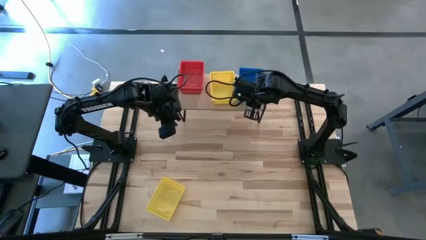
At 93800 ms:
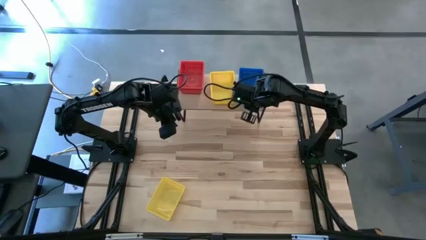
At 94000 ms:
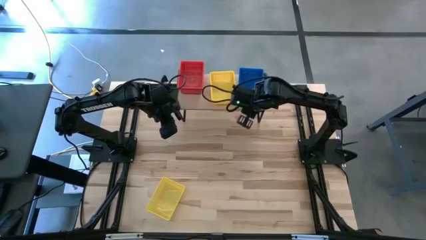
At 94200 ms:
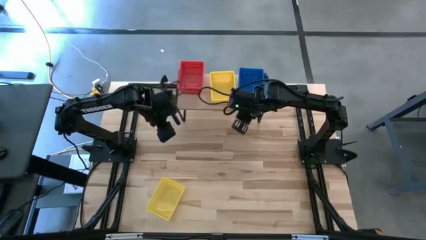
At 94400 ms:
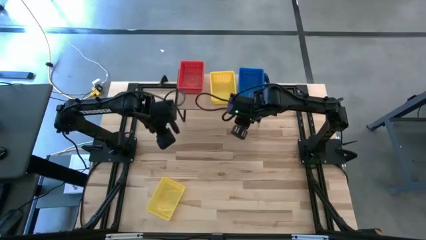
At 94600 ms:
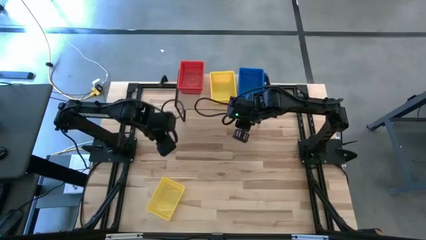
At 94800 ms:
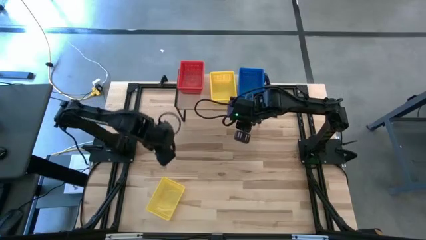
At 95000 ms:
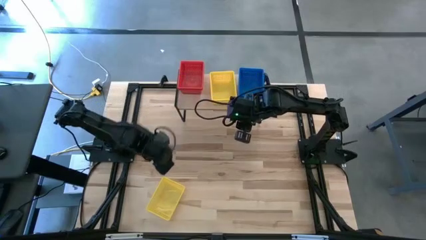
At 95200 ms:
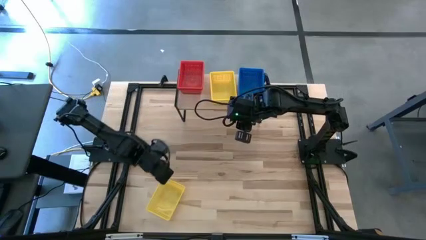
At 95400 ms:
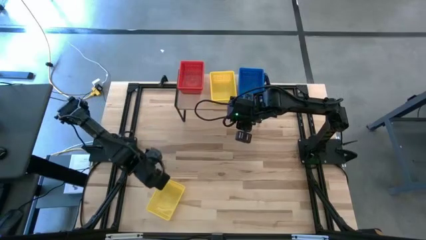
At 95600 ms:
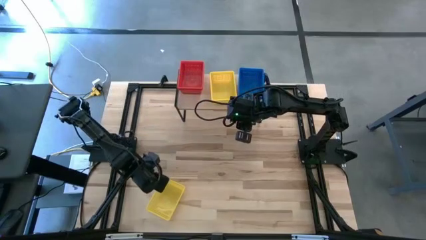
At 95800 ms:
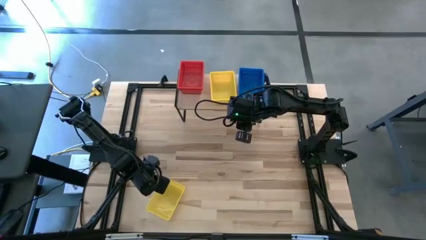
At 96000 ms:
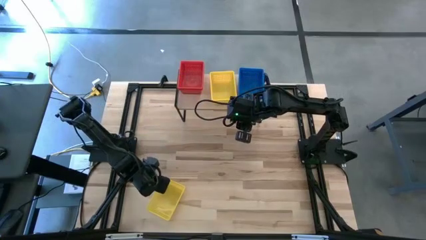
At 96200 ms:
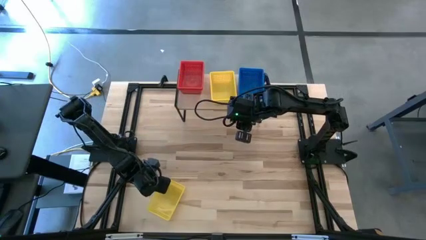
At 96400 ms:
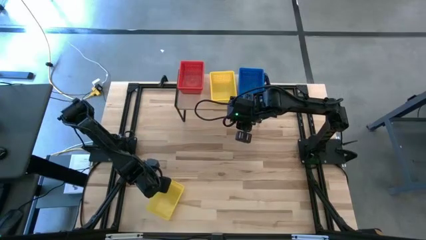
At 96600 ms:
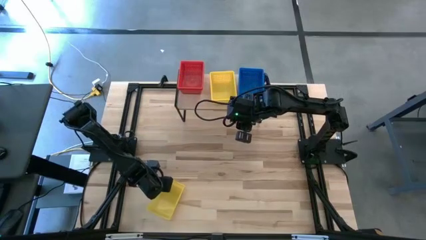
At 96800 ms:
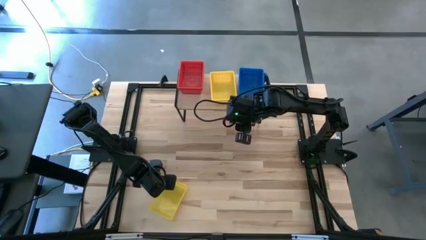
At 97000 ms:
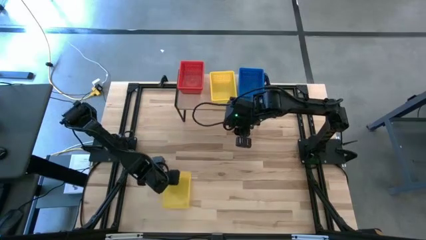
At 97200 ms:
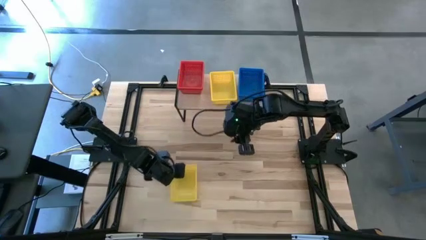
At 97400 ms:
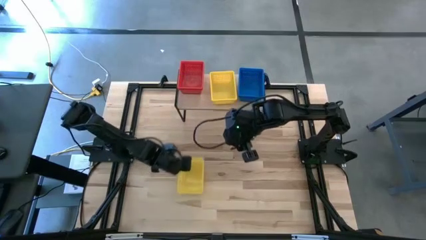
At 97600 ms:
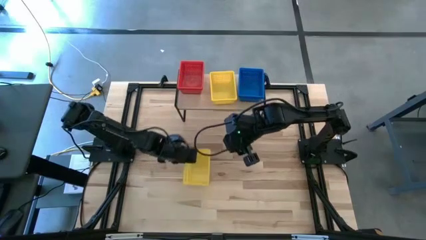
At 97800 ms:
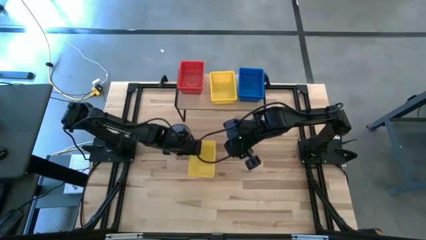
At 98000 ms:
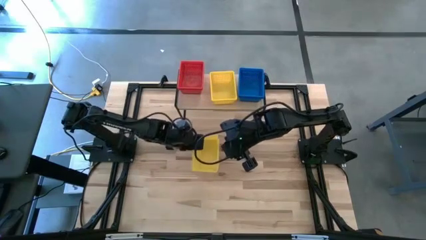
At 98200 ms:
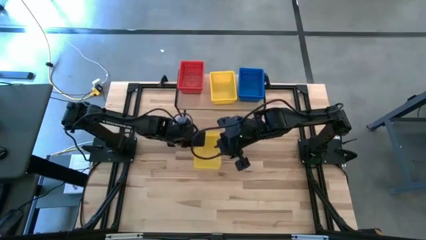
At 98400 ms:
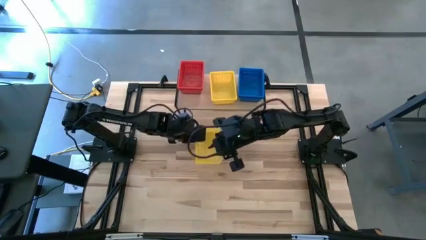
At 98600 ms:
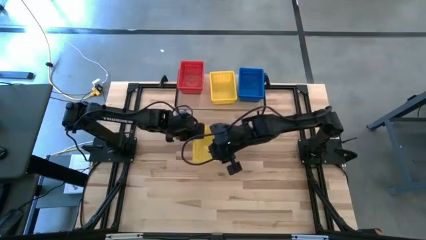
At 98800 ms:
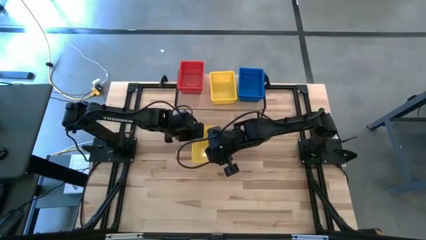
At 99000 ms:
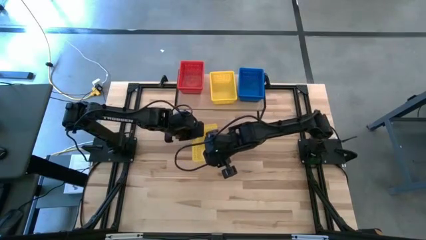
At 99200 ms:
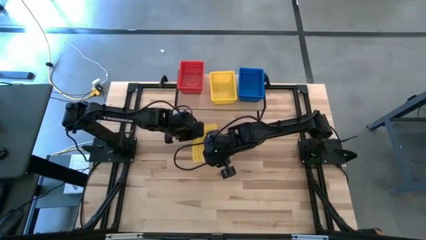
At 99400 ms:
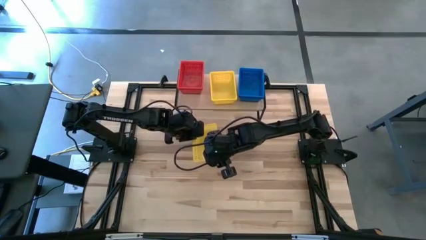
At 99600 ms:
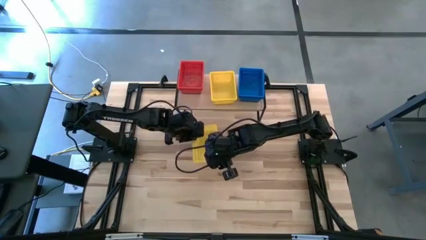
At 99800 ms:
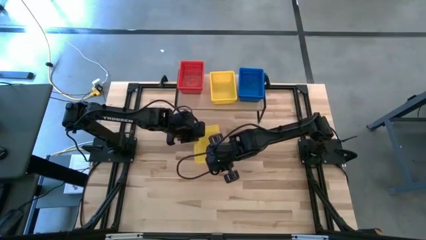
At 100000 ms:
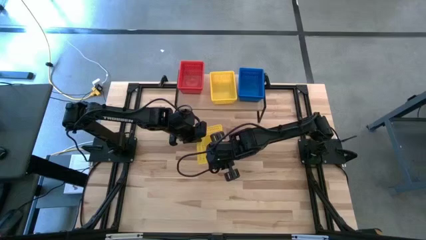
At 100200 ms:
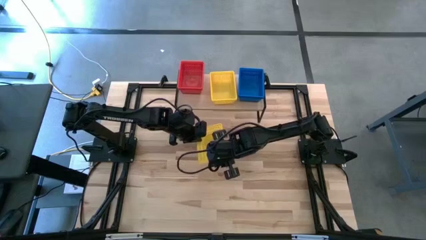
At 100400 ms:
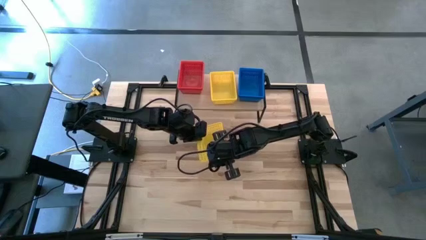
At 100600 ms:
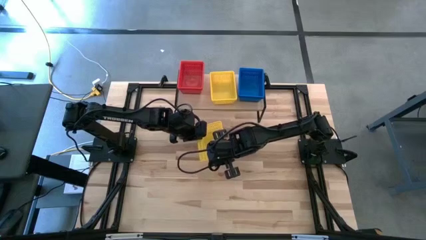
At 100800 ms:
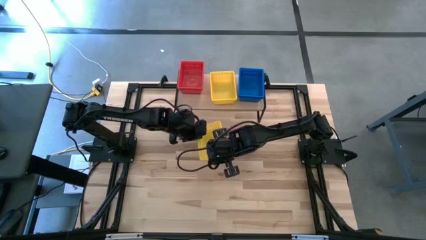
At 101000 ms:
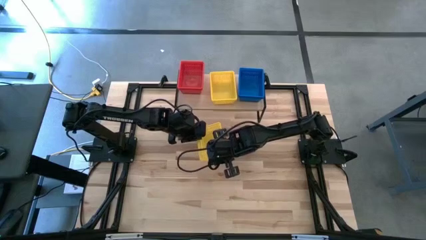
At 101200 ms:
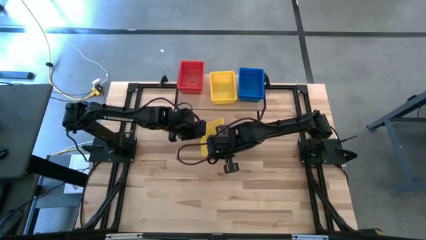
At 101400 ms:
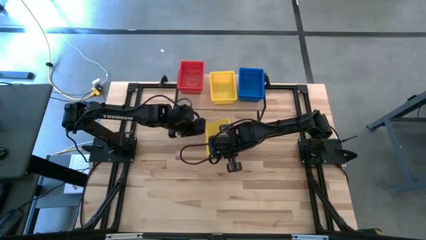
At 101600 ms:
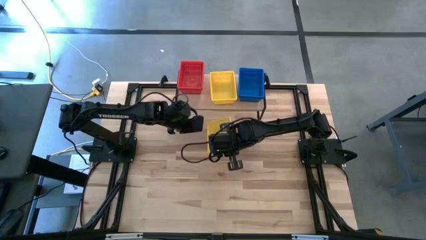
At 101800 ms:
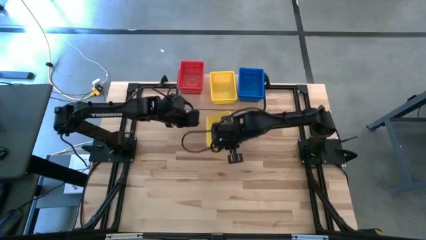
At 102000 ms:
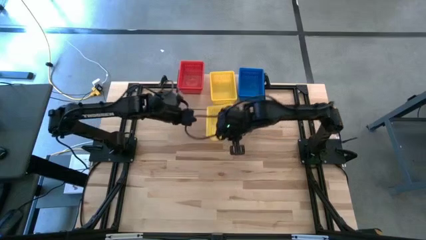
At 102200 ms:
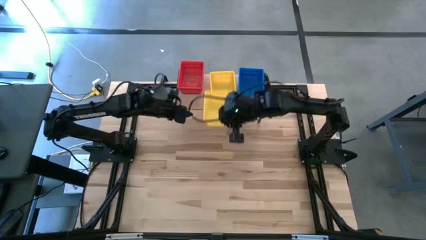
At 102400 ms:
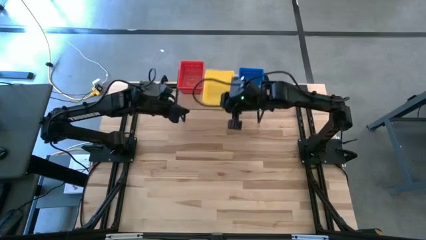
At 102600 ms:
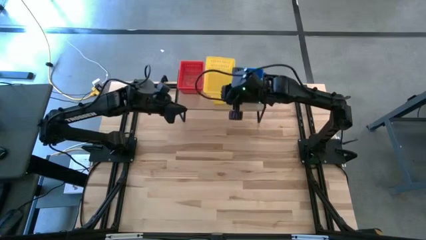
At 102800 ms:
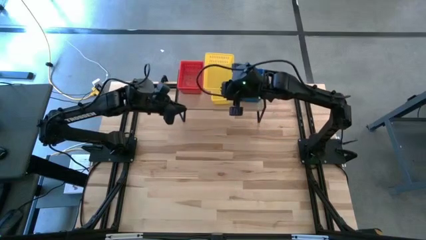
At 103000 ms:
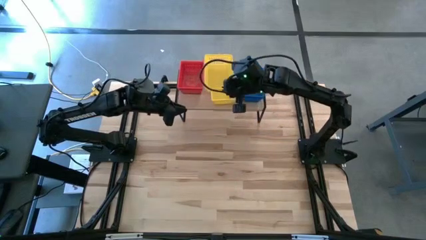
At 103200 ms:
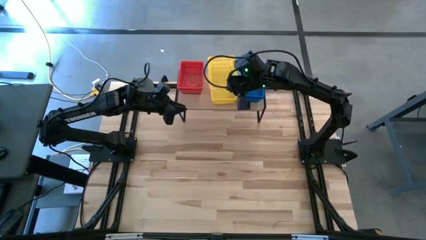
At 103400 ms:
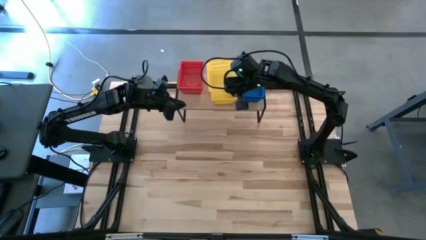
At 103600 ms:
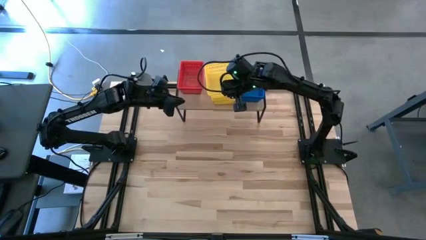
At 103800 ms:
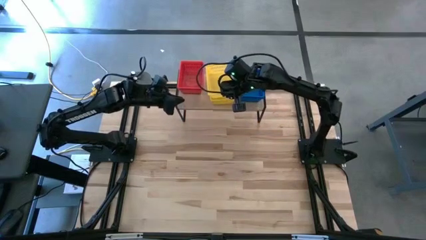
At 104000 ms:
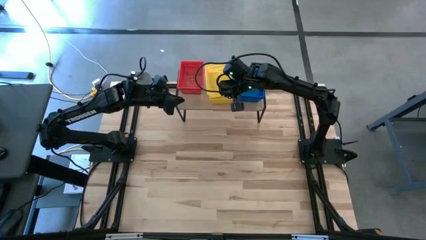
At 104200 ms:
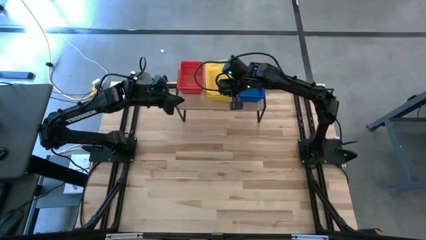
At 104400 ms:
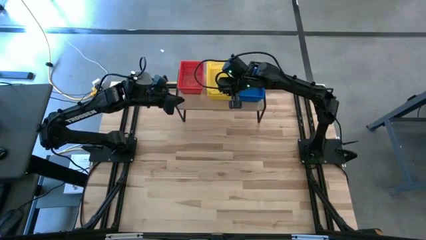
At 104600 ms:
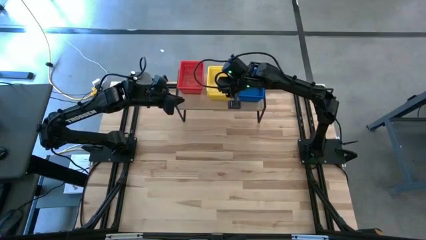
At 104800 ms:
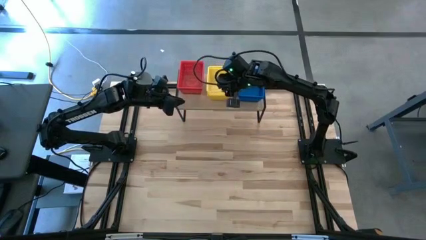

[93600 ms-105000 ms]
Task: Stack baskets on shelf by color
Stack the yellow bin on top of the yellow bins on the shelf

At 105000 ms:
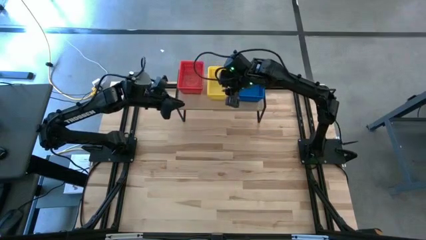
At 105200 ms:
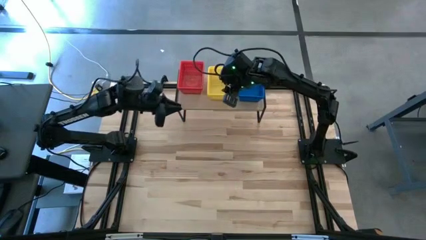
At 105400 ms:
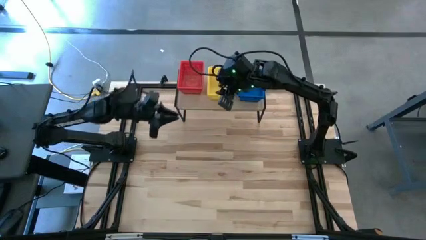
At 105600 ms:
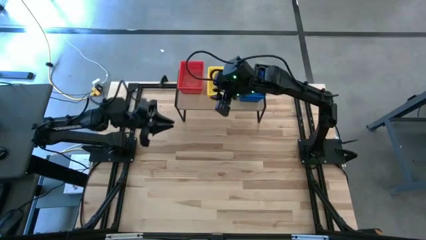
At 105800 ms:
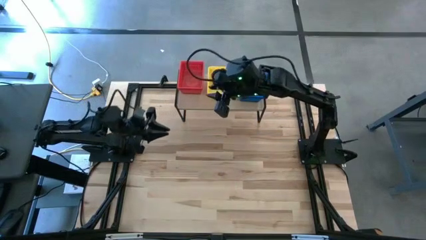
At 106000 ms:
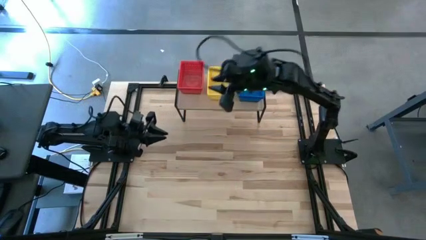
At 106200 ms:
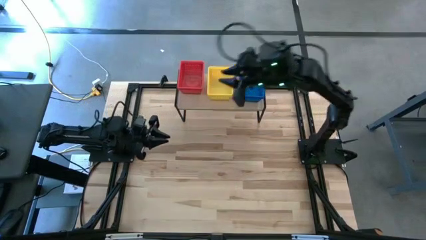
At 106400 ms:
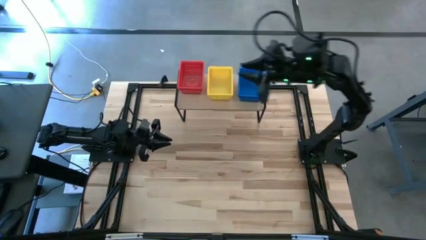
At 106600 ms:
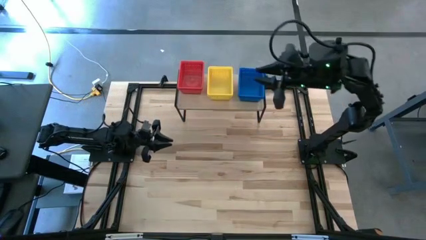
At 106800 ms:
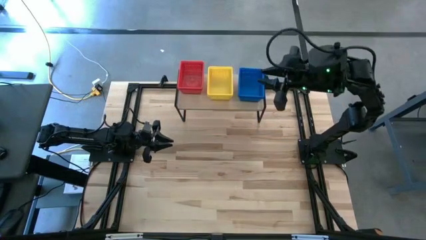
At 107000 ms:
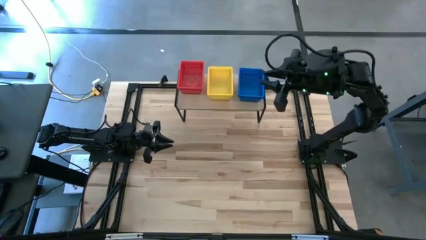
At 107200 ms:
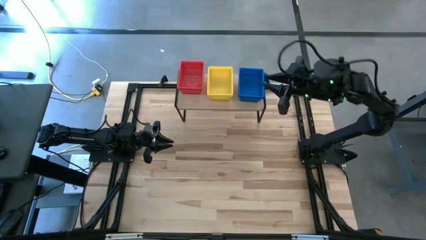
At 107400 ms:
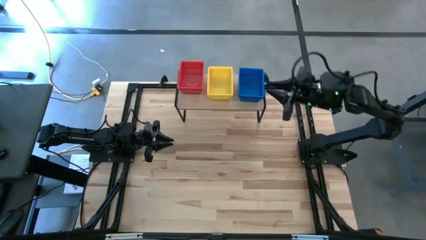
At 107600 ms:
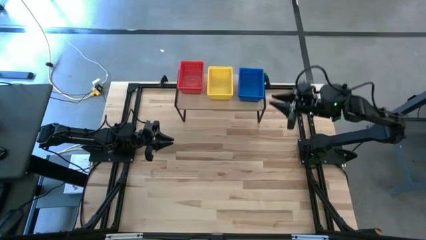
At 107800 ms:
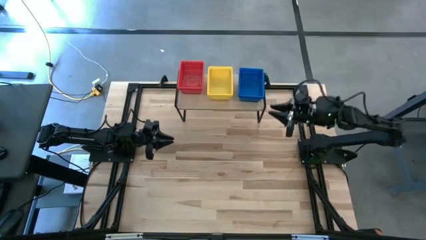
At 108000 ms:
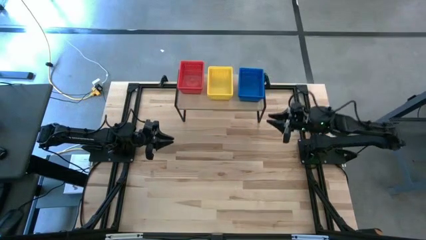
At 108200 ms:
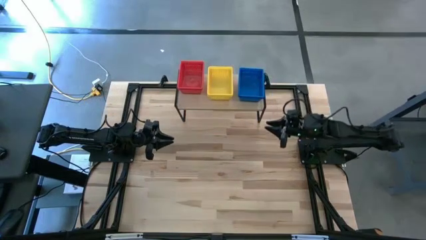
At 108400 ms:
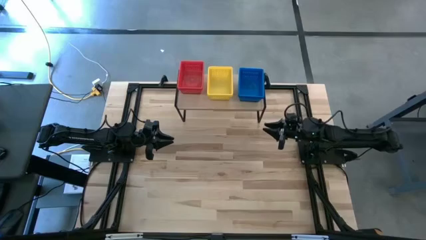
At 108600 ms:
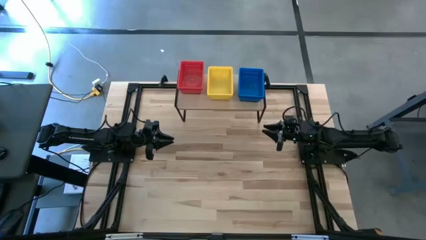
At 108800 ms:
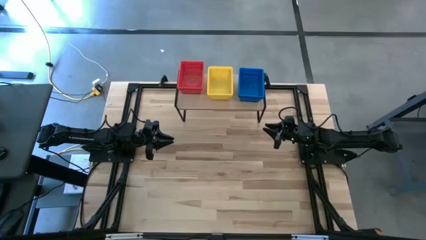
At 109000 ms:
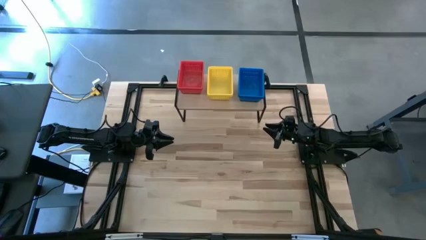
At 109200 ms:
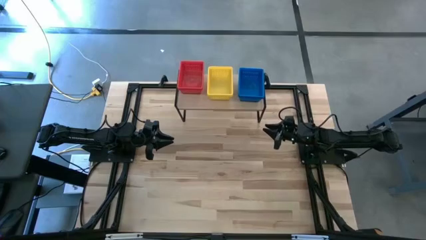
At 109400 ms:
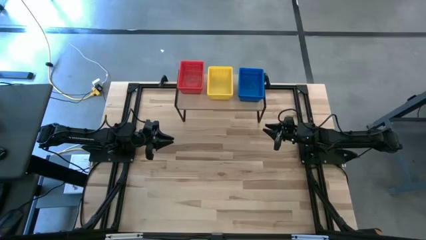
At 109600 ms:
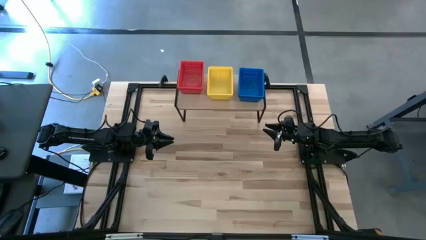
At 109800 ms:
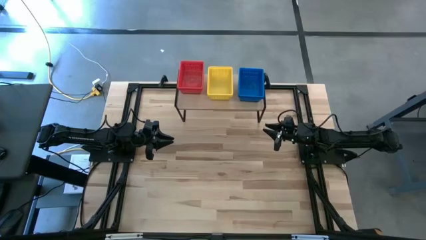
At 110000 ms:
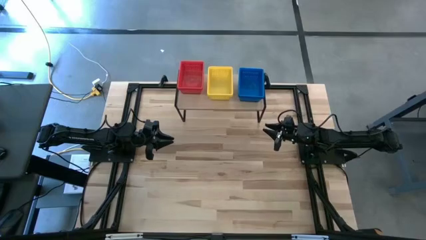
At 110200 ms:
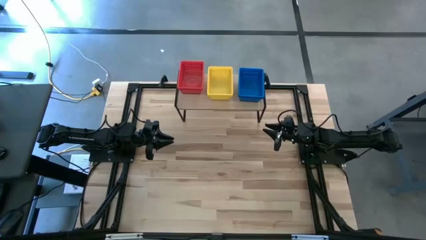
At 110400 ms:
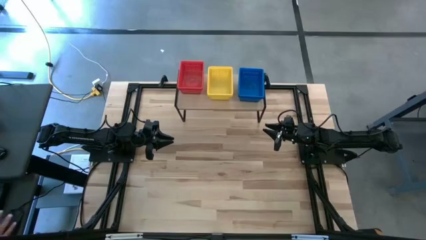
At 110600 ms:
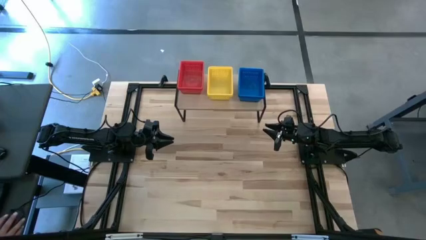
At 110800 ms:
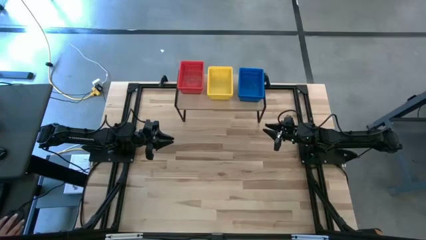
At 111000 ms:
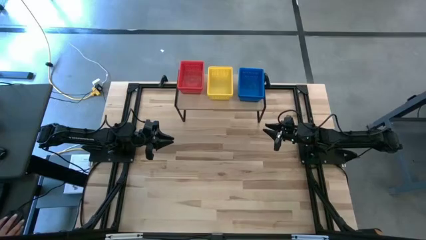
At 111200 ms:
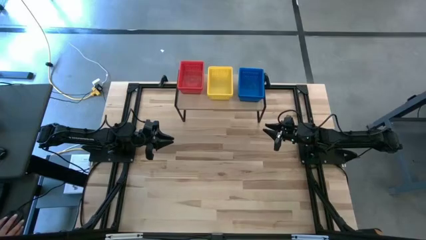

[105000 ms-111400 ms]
Return to Home Position
